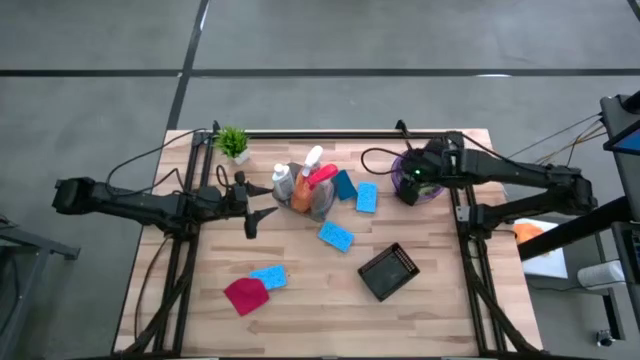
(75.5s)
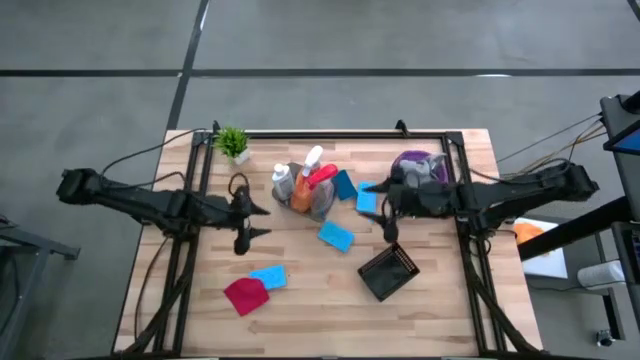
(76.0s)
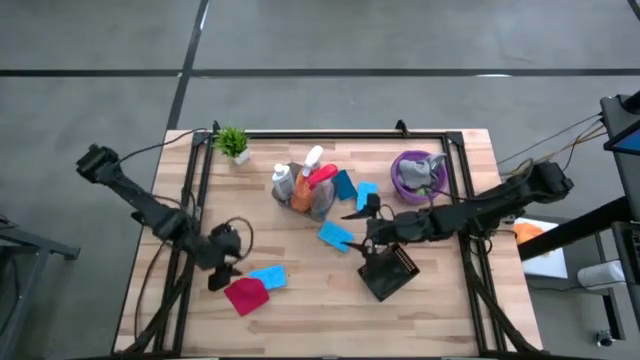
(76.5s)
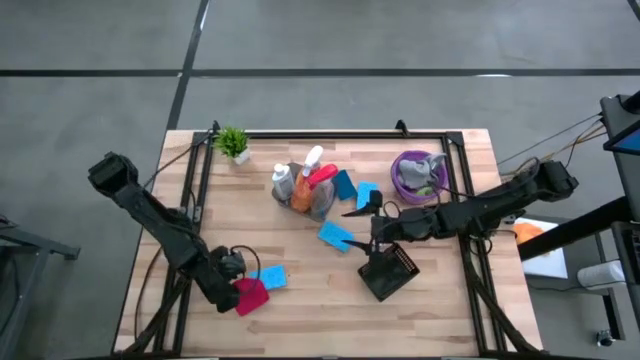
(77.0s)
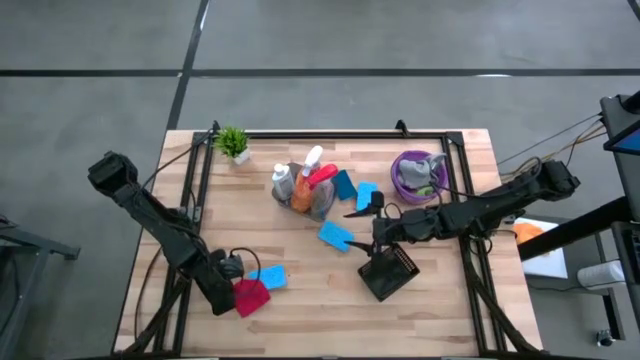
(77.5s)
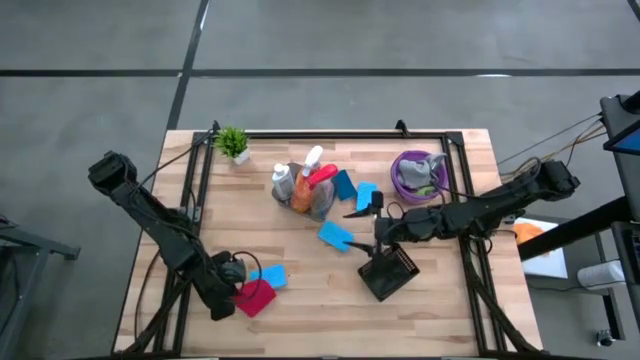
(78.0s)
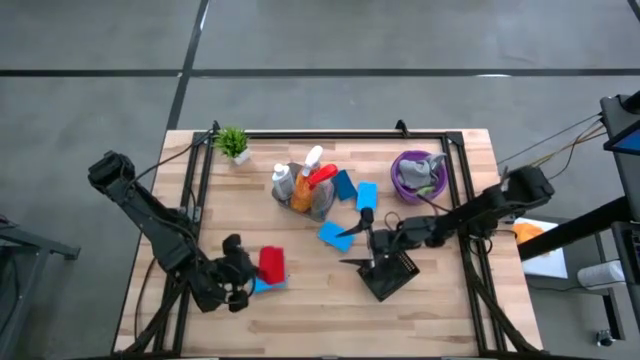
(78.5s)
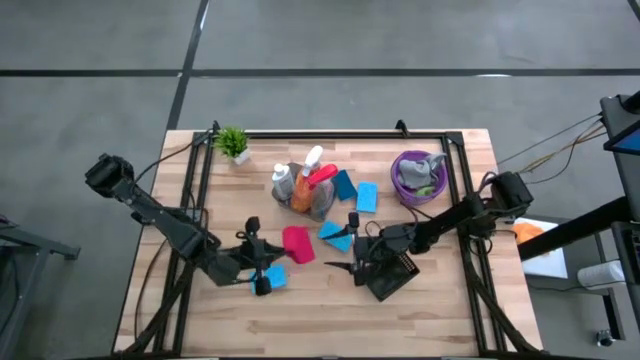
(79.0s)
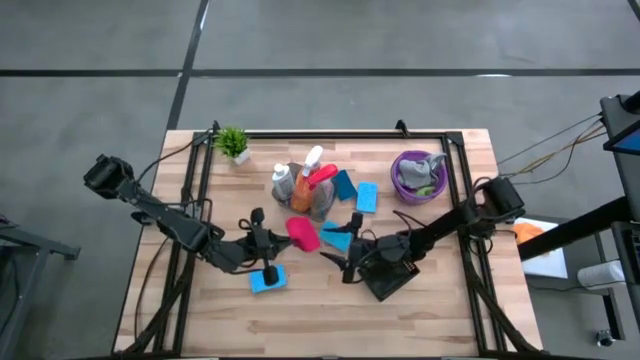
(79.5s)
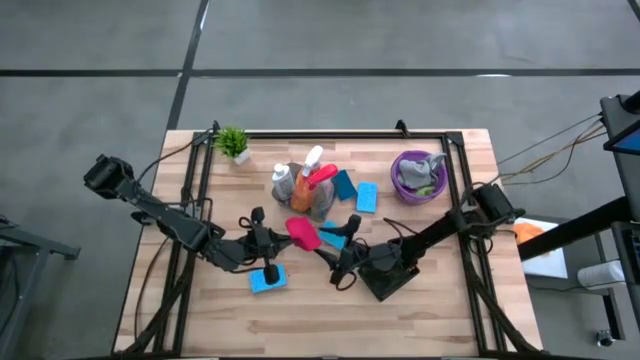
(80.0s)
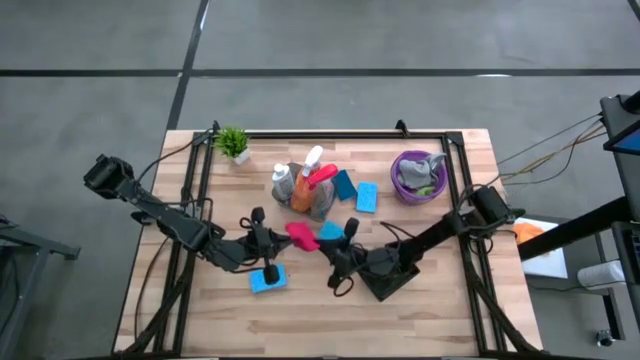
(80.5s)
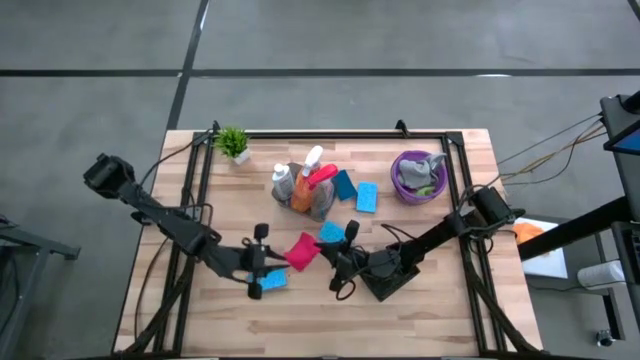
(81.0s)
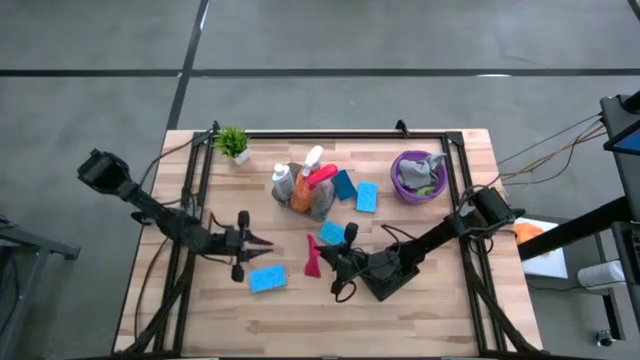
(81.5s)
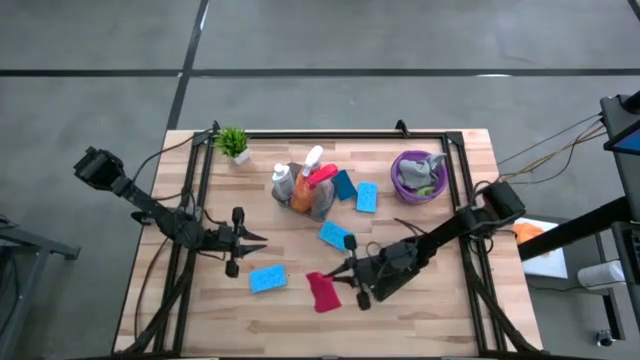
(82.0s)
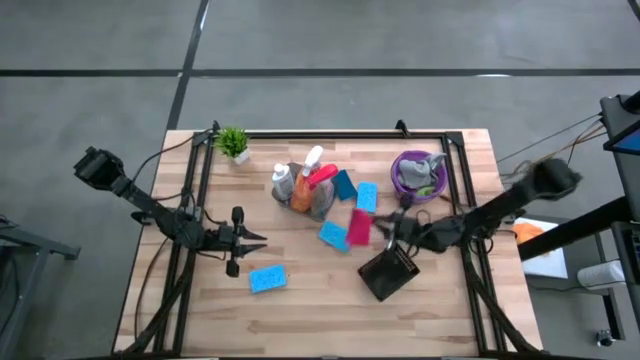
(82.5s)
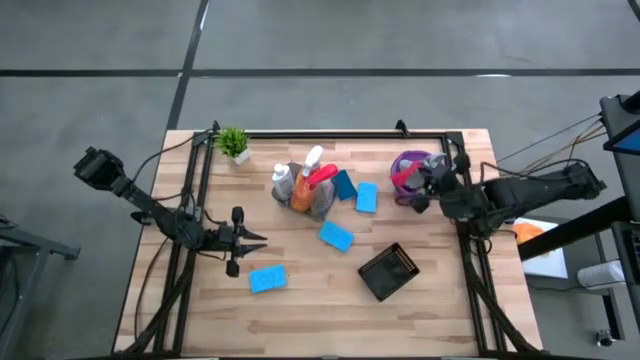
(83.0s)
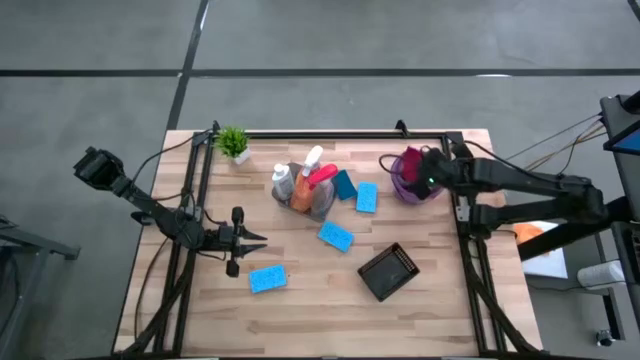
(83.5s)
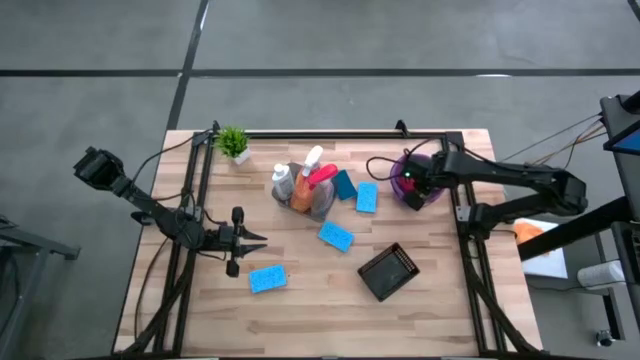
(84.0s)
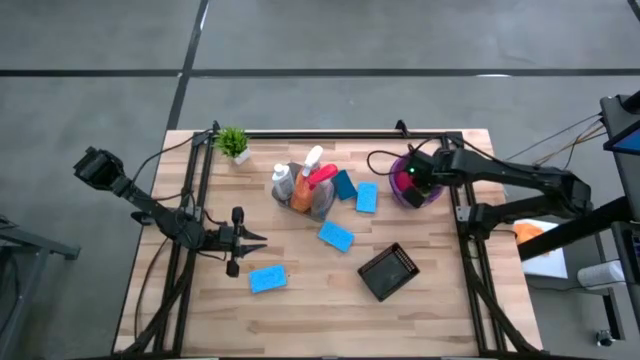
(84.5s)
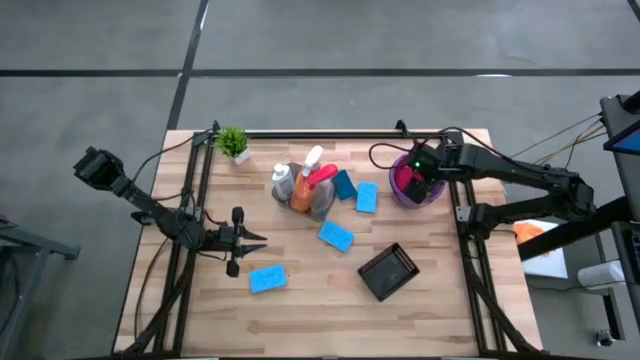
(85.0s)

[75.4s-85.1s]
Task: Pick & Place Kitchen Items
Put the red microfiber towel into the purple bucket

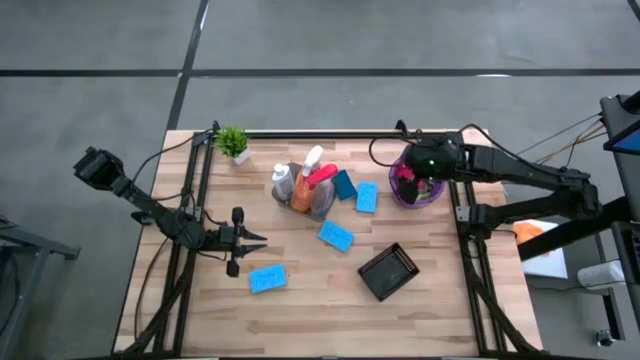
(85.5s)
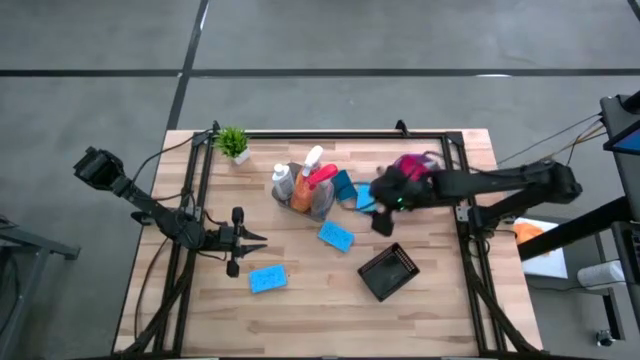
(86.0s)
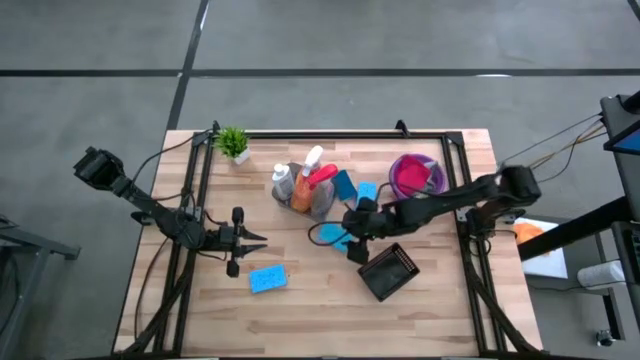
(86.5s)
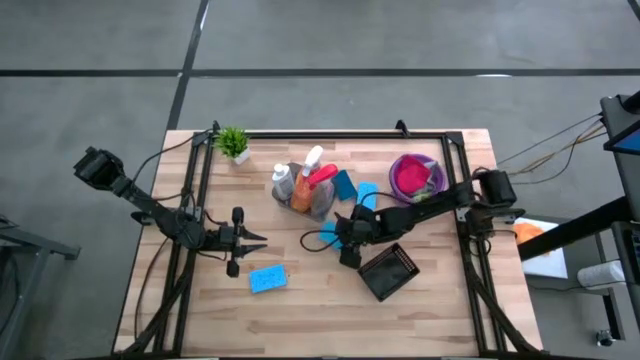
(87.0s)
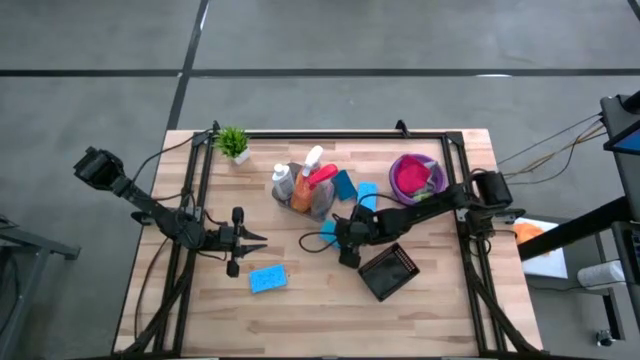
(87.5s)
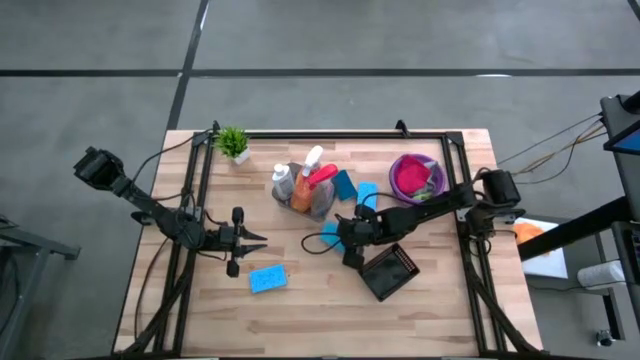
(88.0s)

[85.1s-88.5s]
Put the blue sponge into the black basket

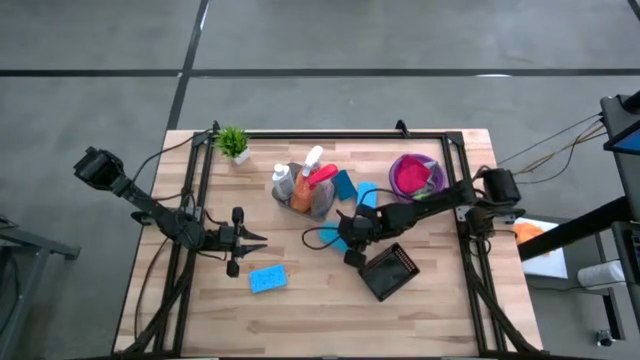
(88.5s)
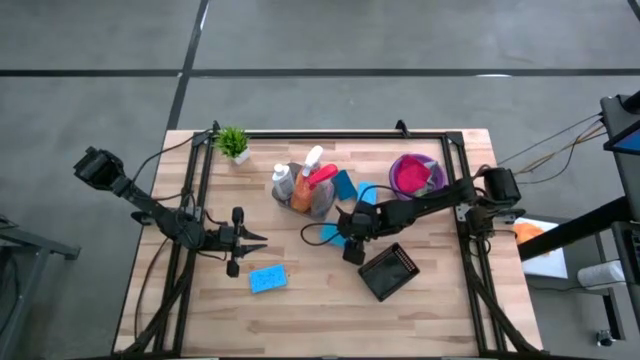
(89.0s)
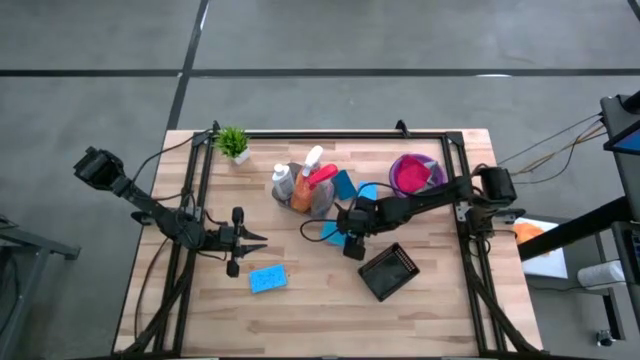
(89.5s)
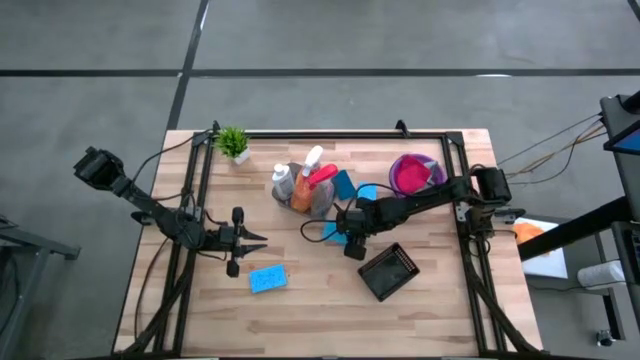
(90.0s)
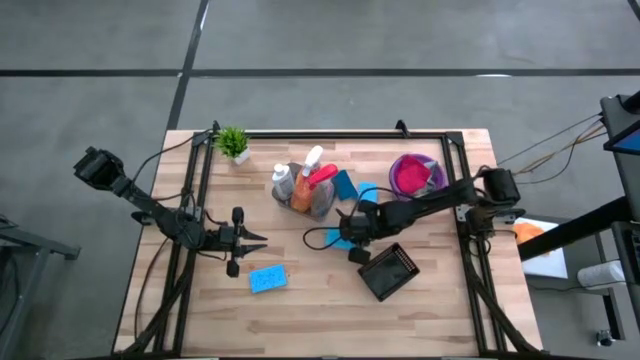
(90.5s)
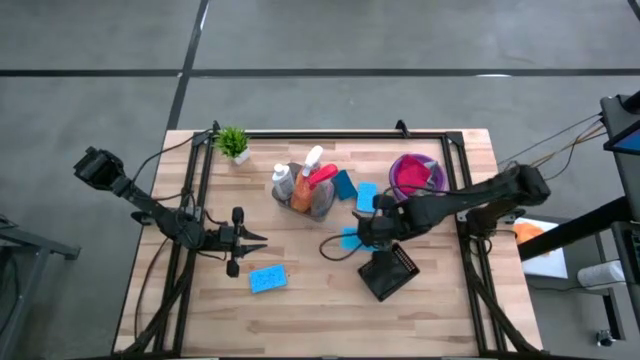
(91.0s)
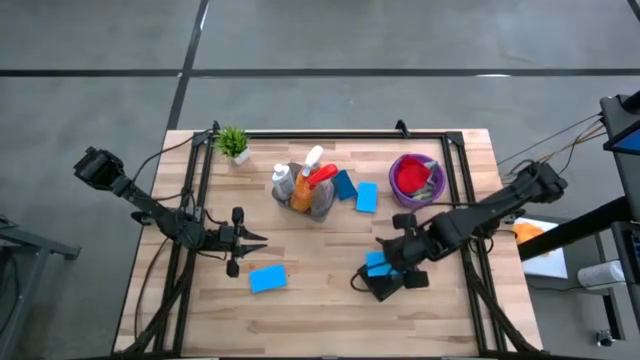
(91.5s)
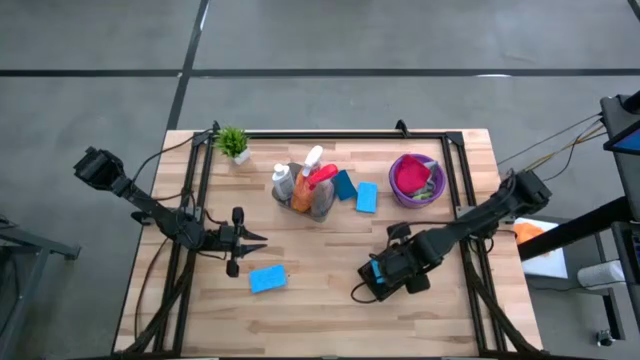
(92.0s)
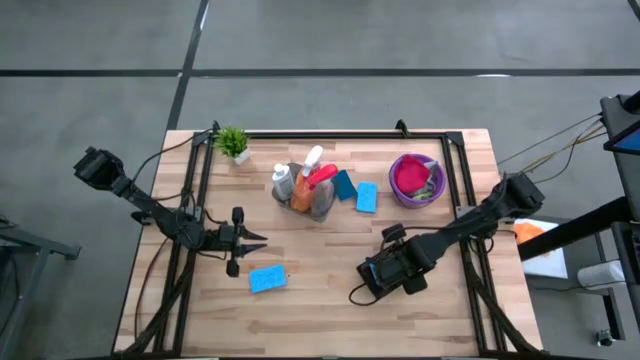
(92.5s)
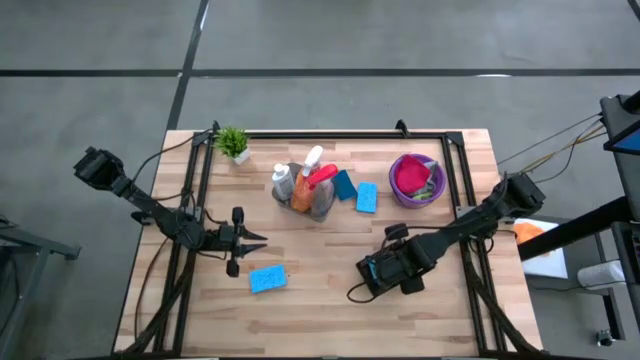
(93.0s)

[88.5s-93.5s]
Put the blue sponge into the black basket

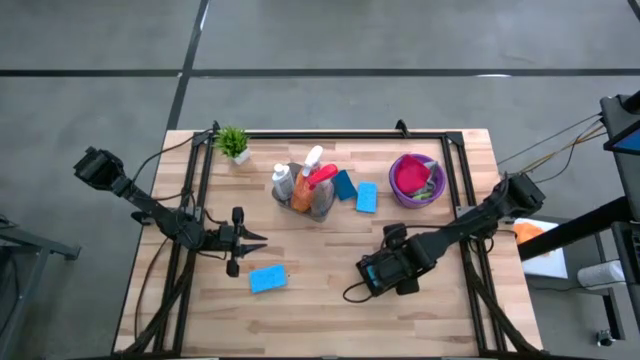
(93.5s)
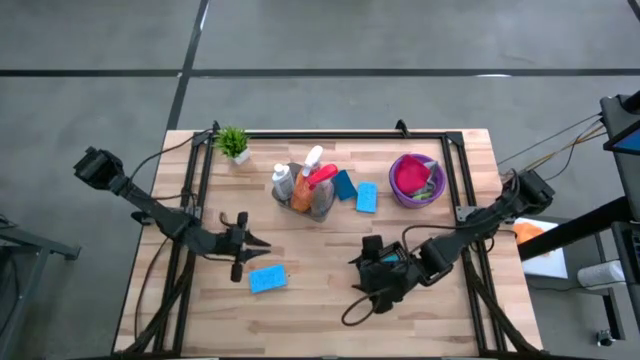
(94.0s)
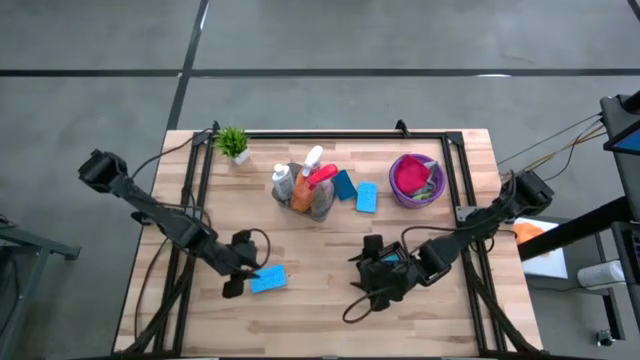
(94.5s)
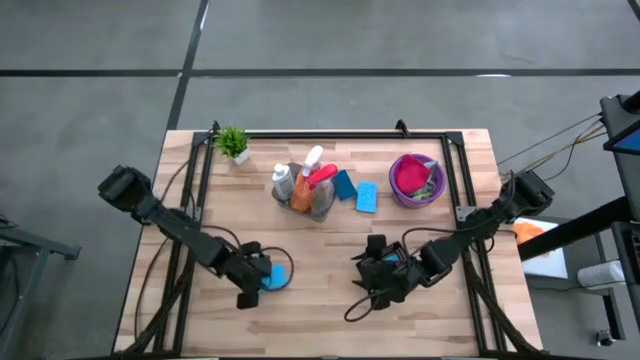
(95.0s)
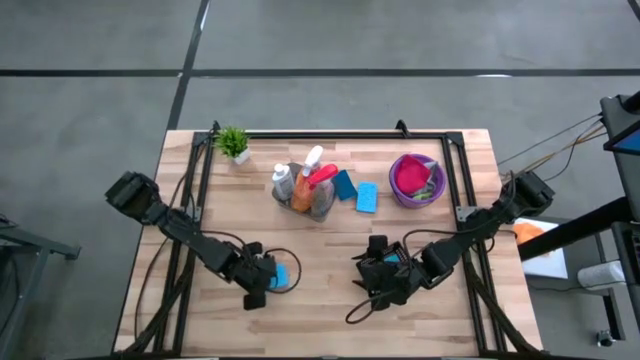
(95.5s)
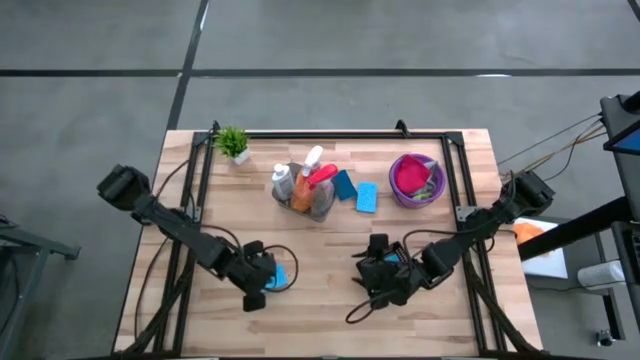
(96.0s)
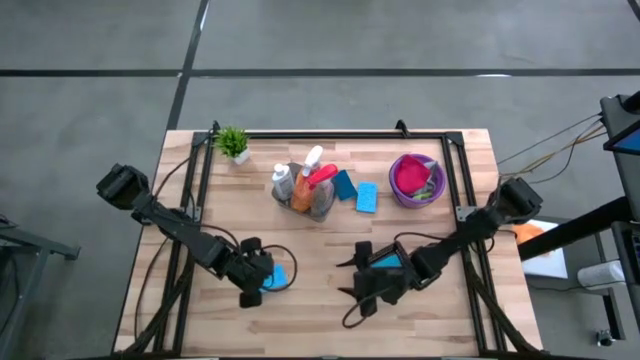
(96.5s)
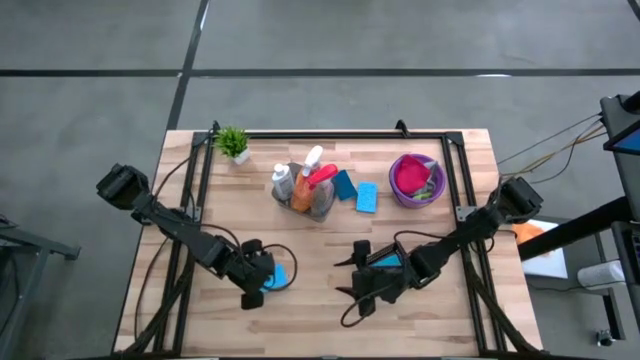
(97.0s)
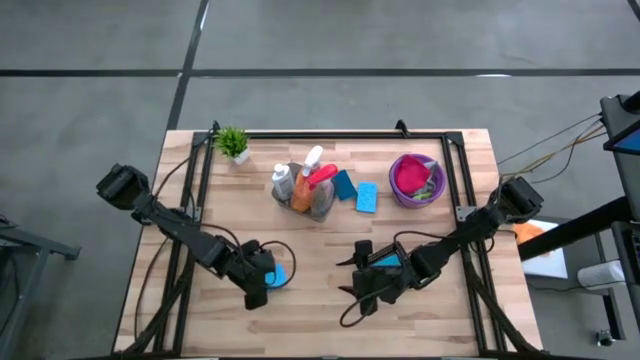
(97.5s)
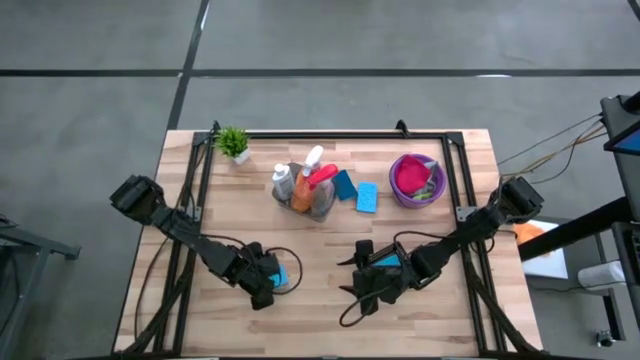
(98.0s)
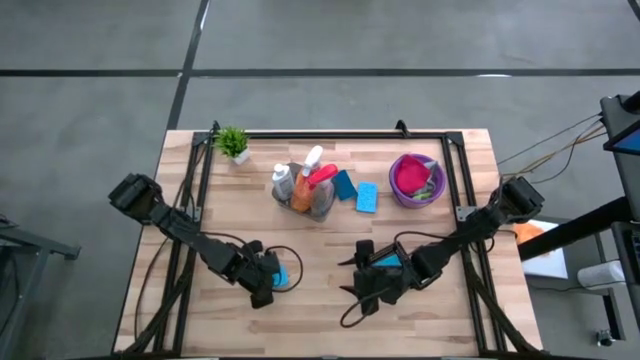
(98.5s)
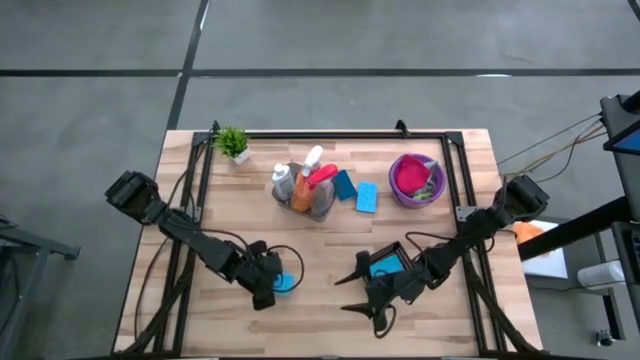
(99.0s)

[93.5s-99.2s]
Put the blue sponge into the black basket
